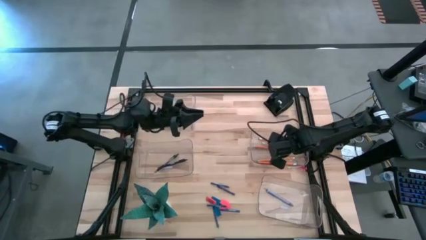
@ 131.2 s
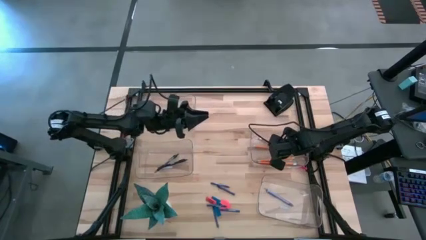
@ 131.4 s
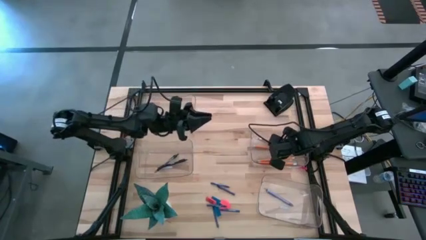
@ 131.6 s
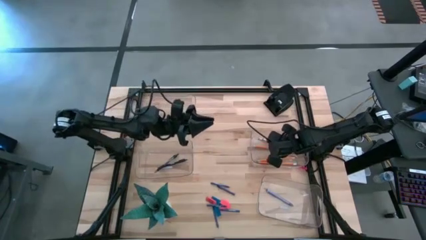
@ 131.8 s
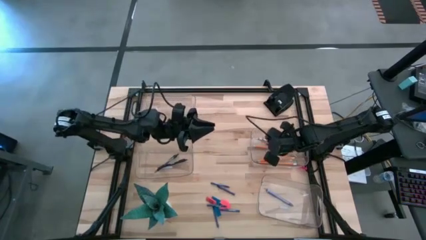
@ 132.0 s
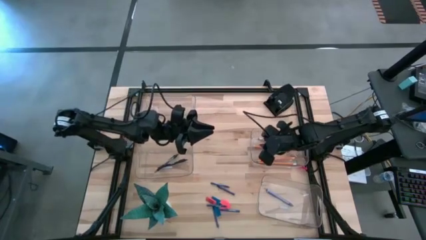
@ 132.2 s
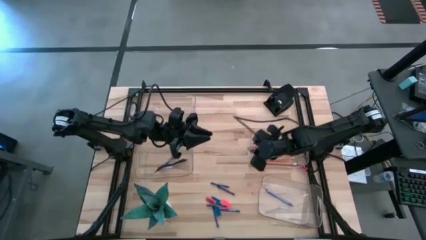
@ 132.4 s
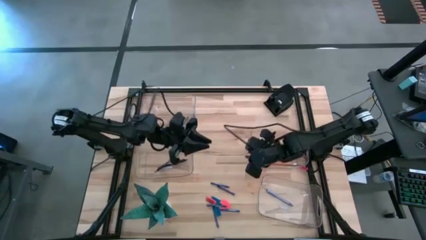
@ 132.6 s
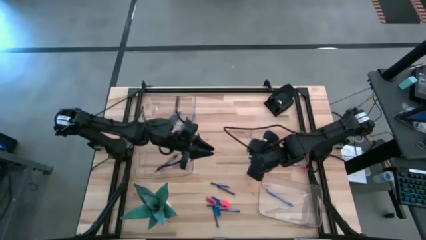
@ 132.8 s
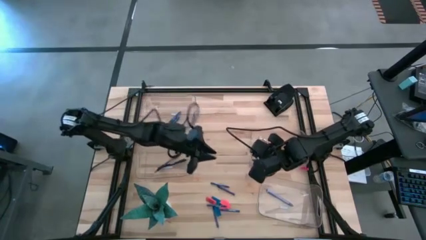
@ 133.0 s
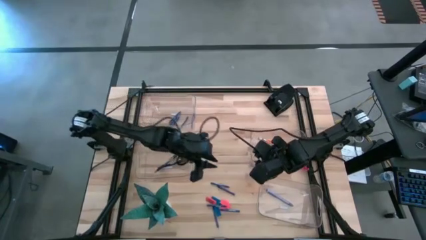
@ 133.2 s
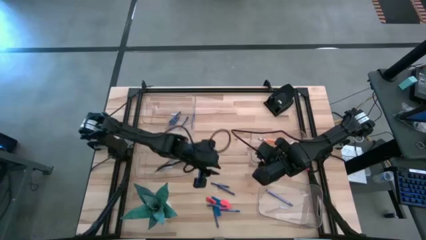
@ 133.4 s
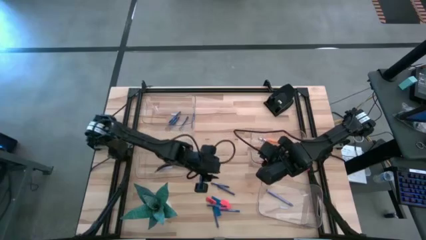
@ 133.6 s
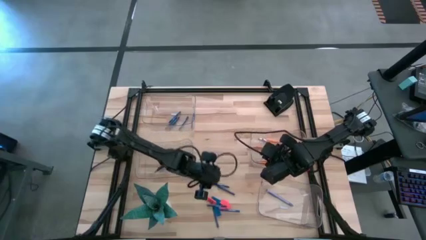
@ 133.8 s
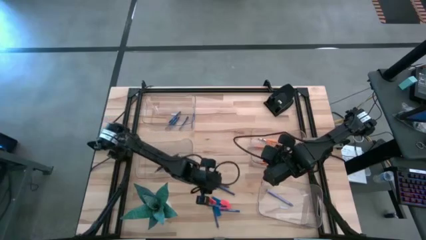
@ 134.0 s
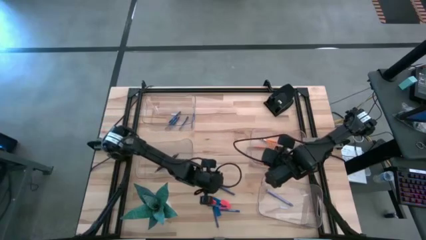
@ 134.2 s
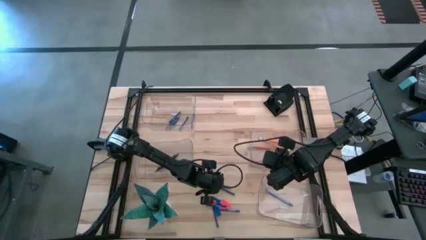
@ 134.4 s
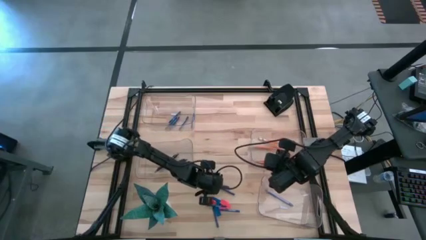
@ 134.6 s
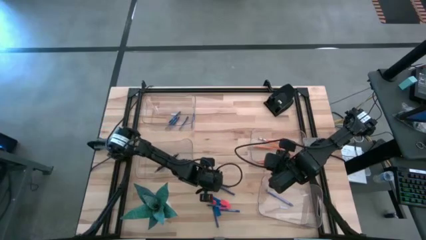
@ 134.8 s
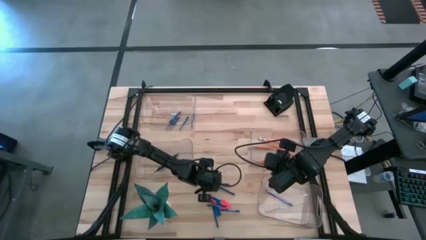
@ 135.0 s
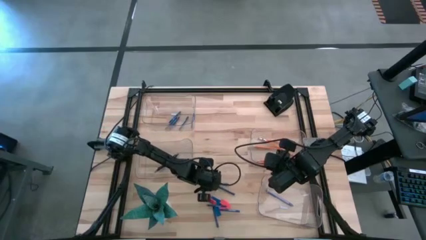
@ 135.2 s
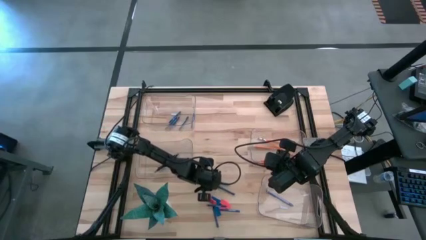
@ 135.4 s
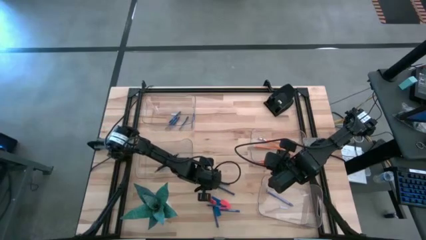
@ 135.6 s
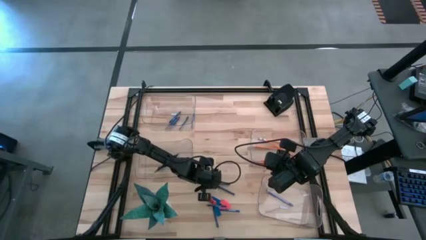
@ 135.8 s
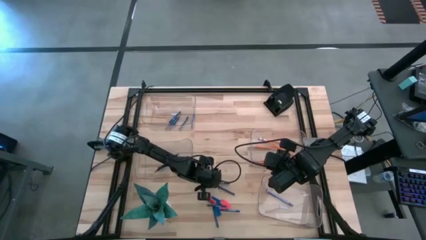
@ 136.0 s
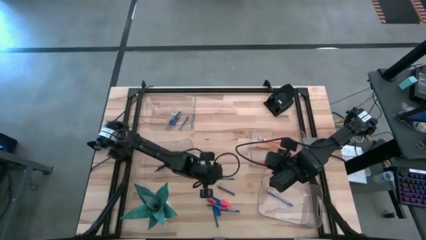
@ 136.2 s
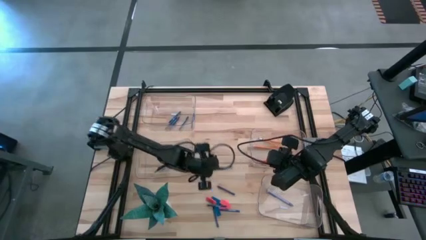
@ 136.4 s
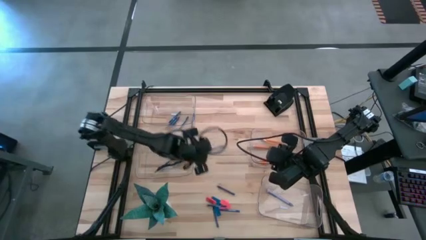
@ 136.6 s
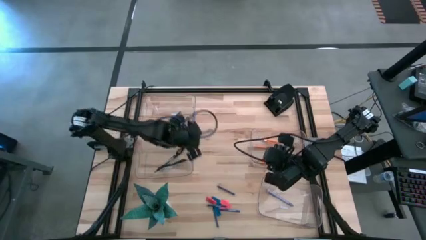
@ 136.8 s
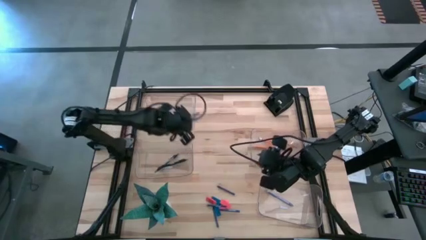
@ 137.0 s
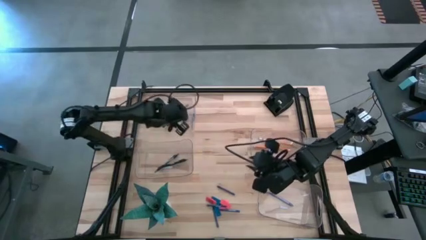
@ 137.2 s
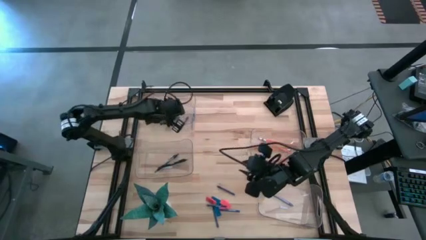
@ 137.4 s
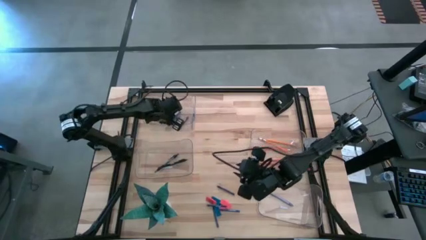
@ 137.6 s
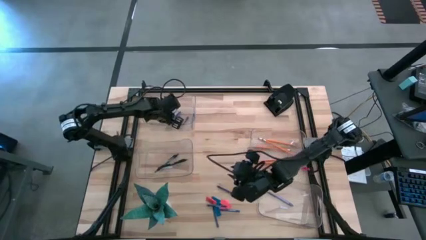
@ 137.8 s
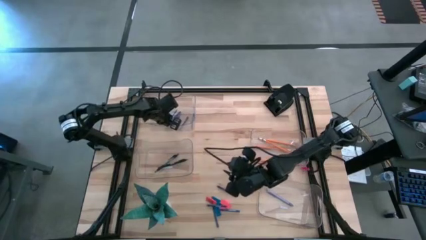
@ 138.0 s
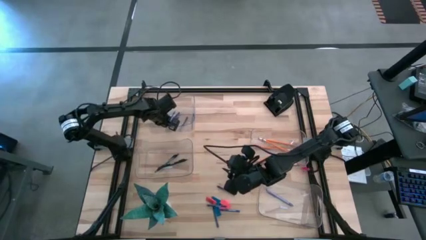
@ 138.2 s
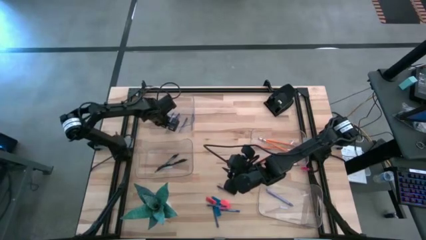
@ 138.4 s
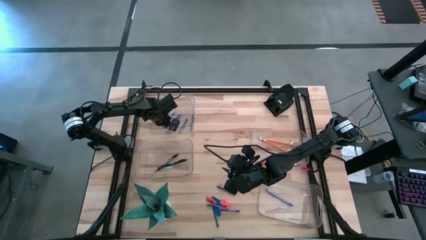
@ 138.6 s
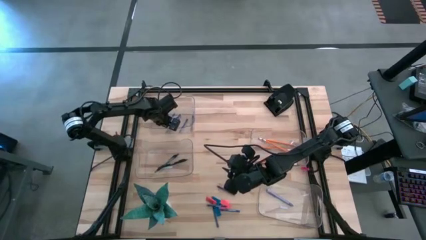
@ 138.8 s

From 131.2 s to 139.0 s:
Task: Sort crayons/erasers/pens/pencils in bins
Put the blue crayon into the top transparent bin

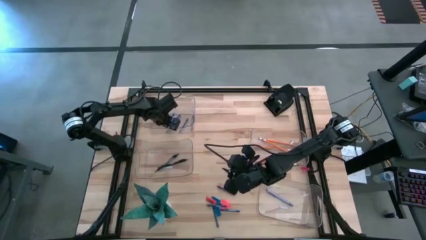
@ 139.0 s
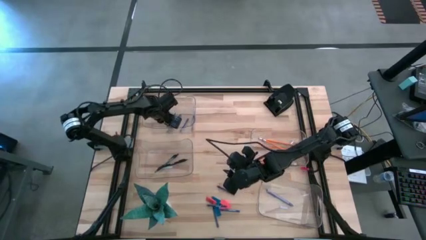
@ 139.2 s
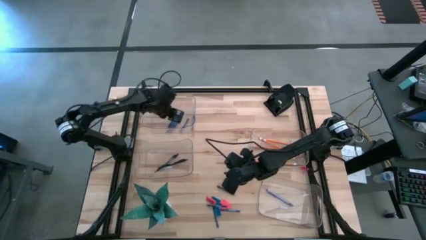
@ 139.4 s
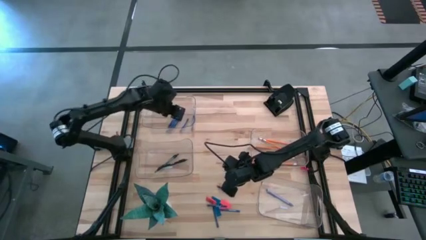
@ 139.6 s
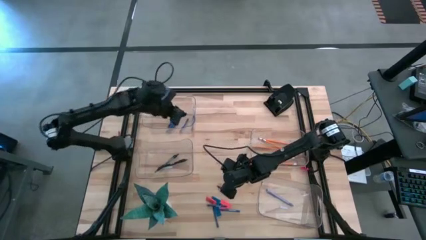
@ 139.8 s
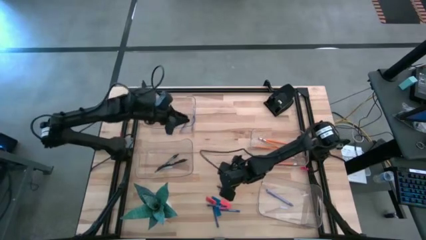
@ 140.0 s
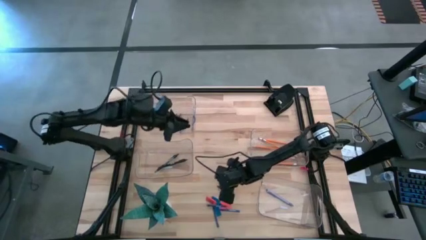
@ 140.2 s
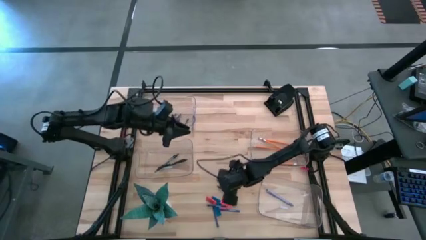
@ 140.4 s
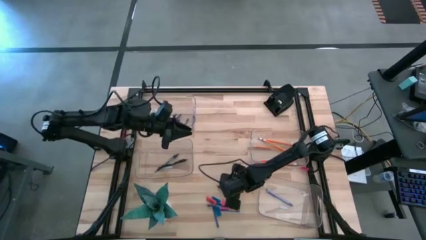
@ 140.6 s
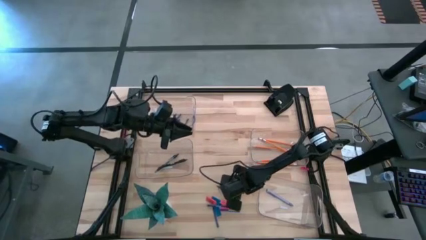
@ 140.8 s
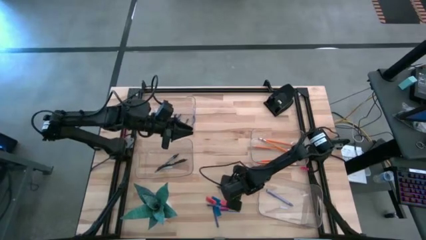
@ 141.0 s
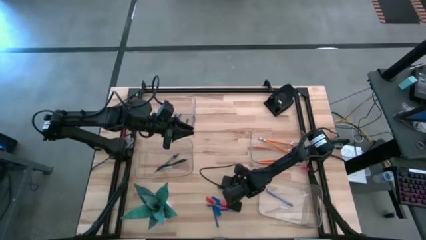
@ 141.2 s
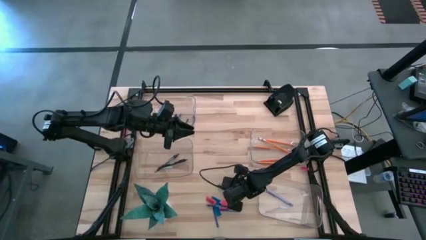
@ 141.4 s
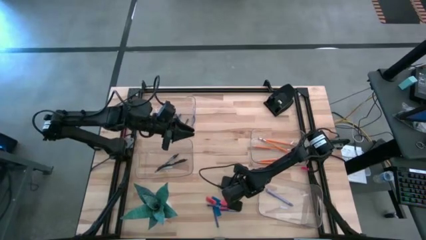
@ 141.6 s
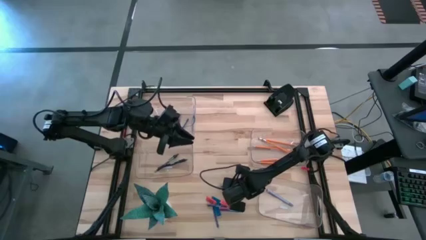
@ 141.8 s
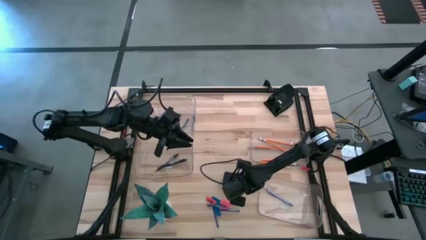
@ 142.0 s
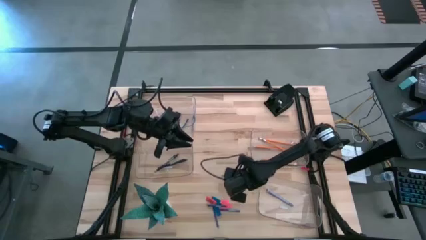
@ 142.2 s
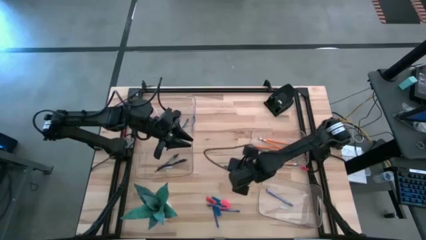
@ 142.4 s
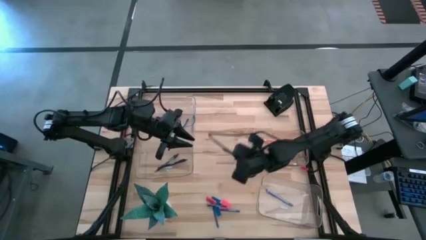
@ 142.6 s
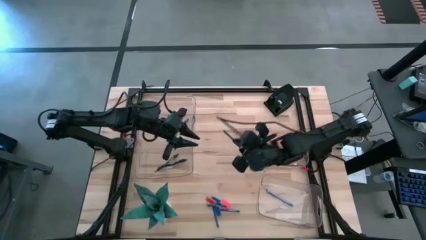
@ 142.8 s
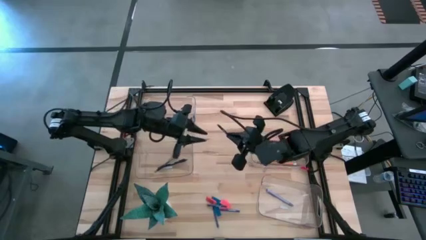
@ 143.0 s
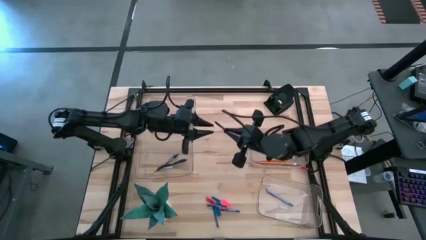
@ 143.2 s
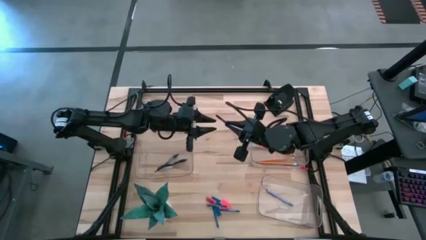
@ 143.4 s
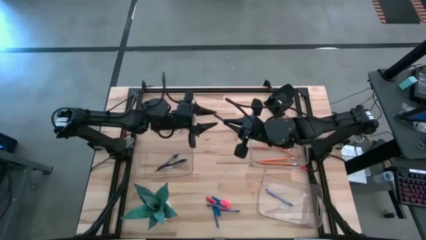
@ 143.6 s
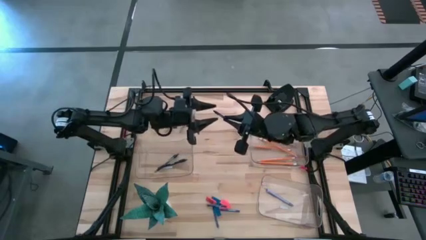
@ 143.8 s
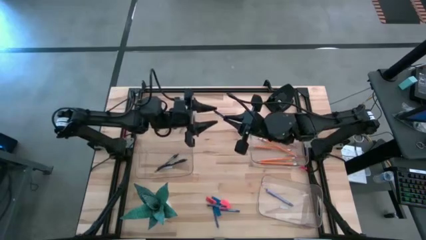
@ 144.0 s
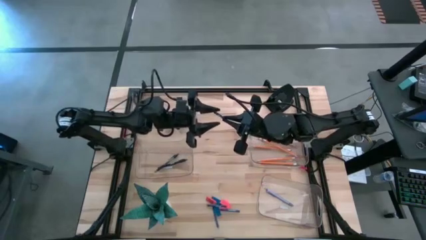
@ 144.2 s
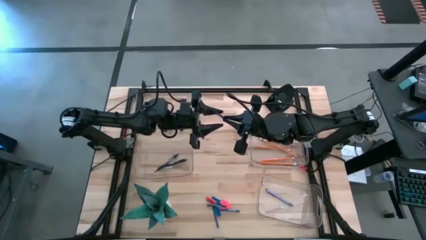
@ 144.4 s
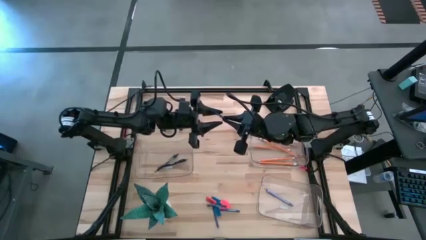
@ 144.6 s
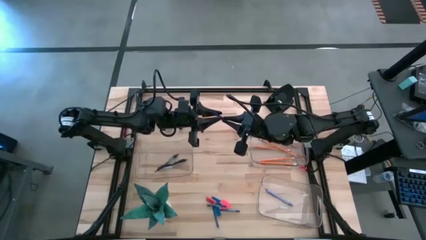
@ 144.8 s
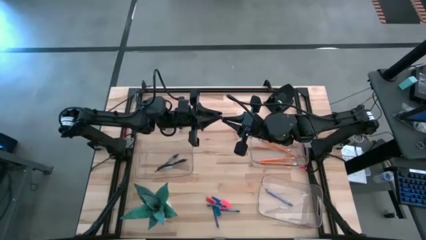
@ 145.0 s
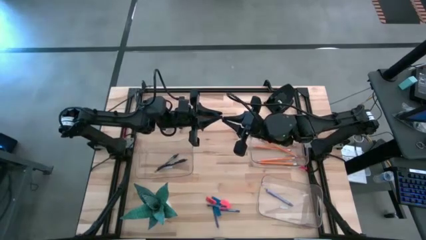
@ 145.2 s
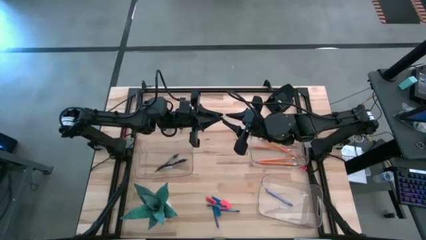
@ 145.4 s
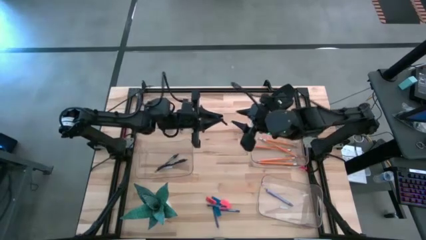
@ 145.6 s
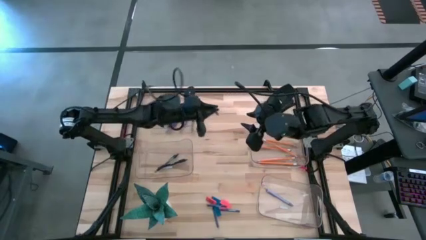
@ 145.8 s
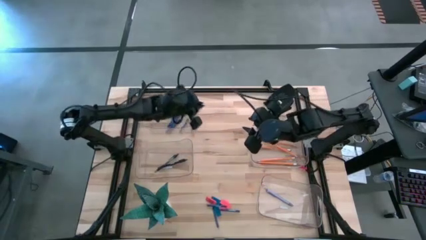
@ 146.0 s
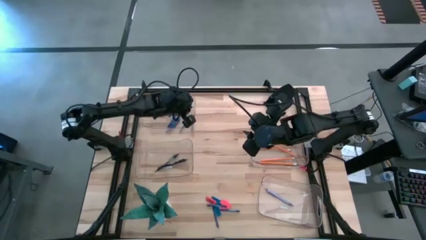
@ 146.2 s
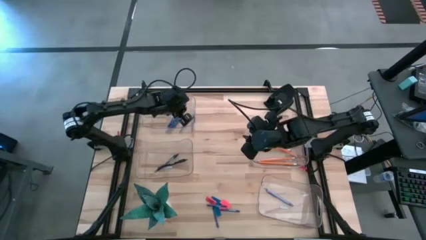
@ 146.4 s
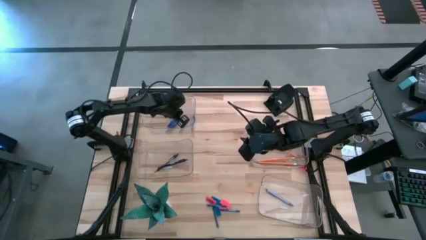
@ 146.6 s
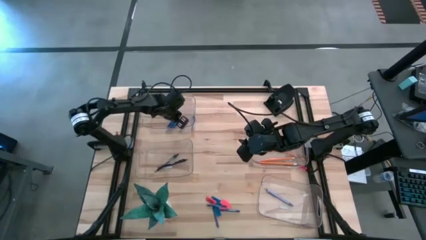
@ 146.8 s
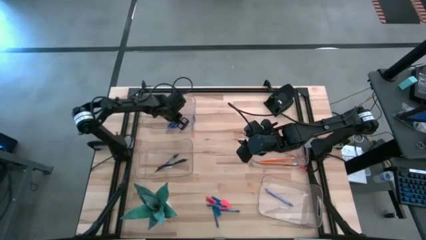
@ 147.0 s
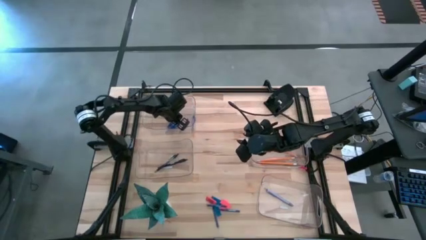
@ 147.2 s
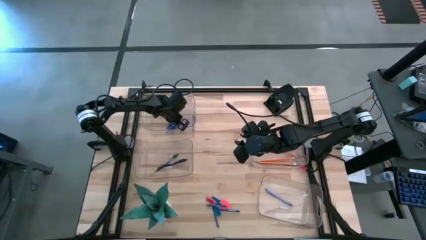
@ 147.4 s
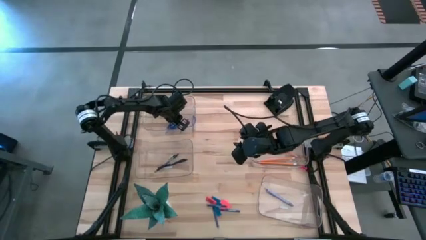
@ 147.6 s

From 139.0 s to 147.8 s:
Put the blue crayon into the top transparent bin
